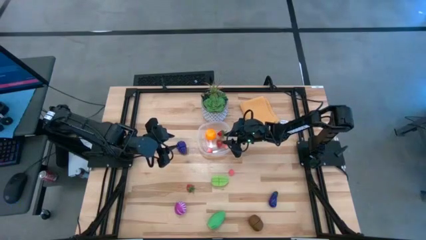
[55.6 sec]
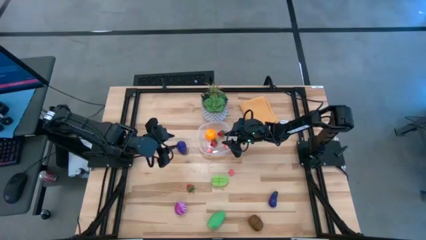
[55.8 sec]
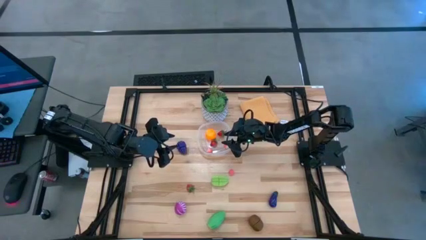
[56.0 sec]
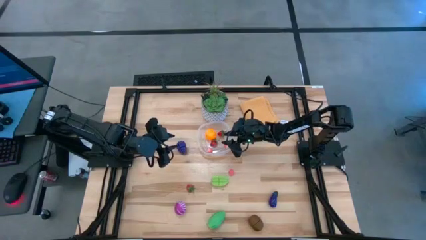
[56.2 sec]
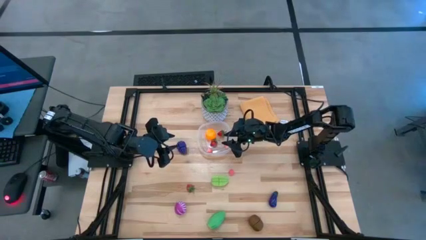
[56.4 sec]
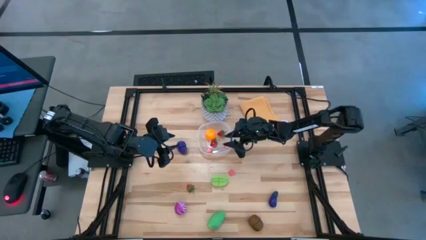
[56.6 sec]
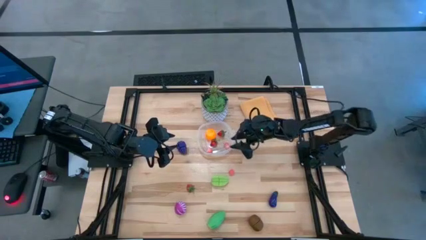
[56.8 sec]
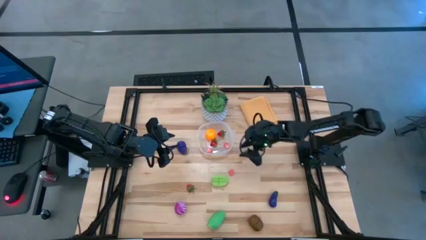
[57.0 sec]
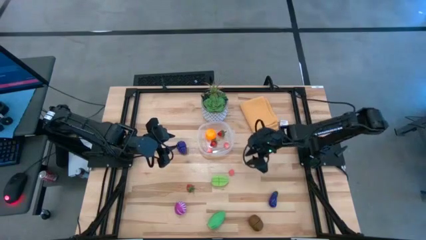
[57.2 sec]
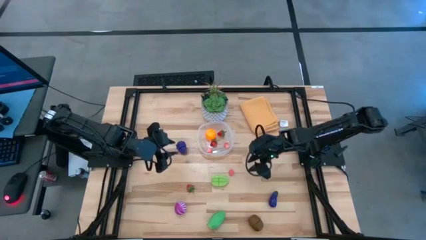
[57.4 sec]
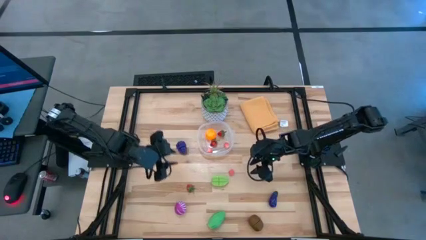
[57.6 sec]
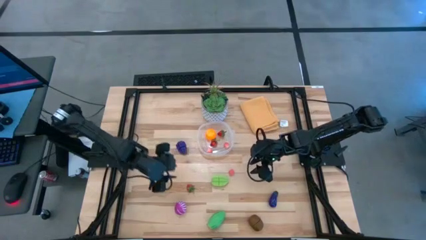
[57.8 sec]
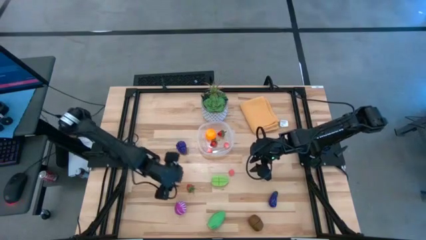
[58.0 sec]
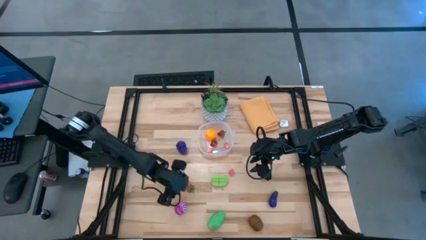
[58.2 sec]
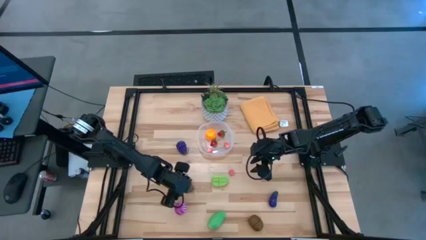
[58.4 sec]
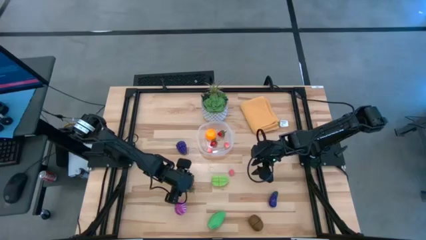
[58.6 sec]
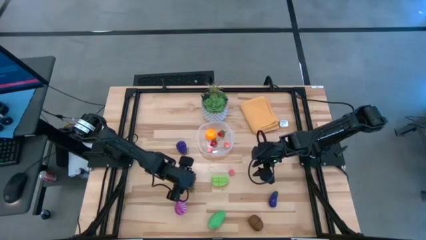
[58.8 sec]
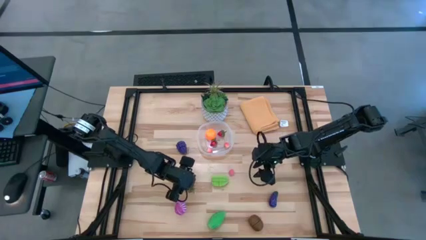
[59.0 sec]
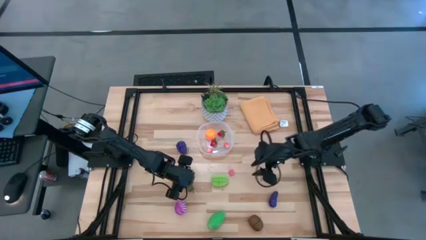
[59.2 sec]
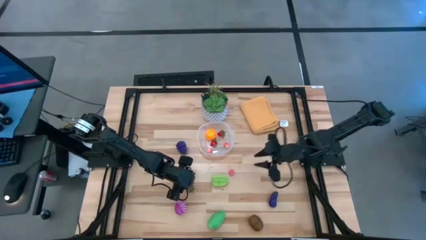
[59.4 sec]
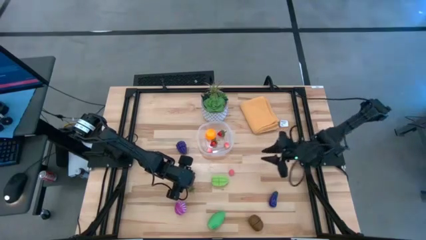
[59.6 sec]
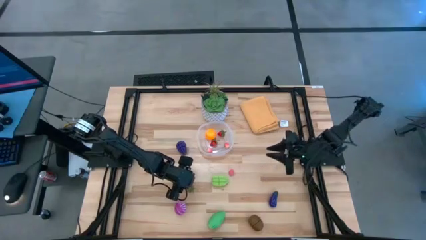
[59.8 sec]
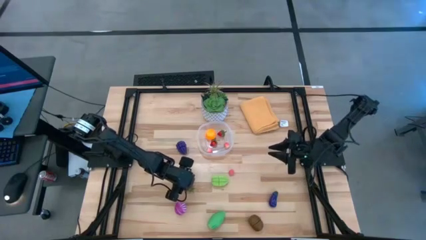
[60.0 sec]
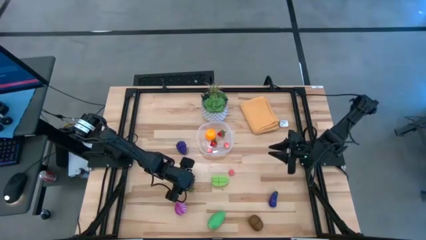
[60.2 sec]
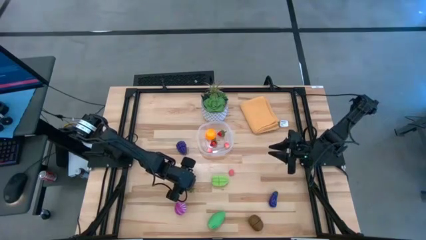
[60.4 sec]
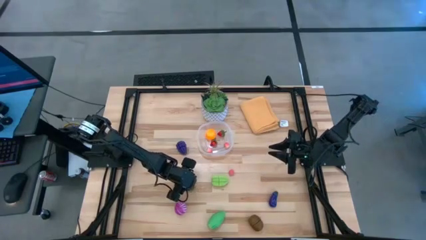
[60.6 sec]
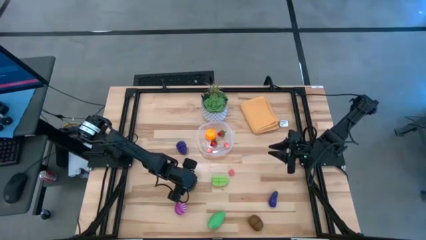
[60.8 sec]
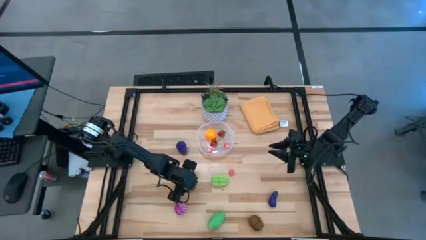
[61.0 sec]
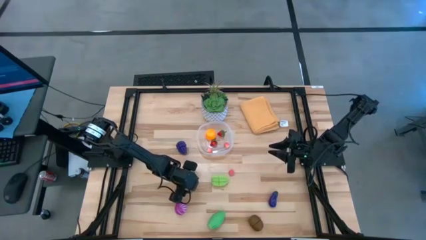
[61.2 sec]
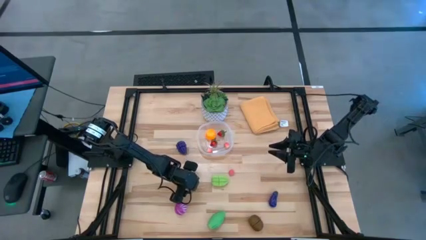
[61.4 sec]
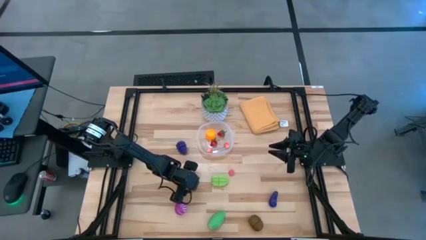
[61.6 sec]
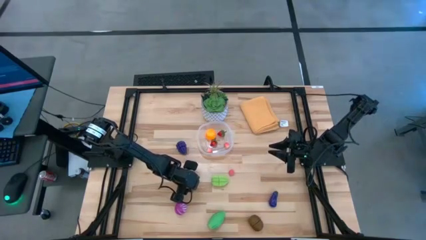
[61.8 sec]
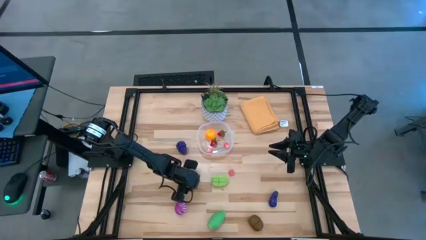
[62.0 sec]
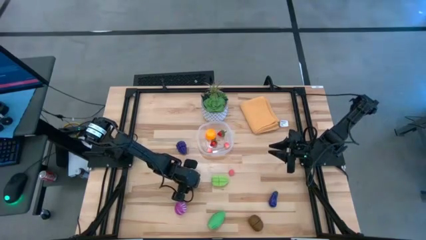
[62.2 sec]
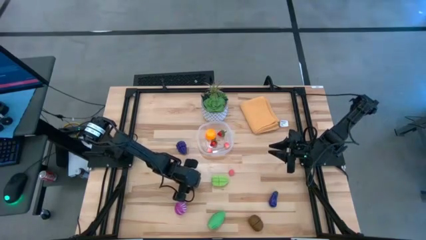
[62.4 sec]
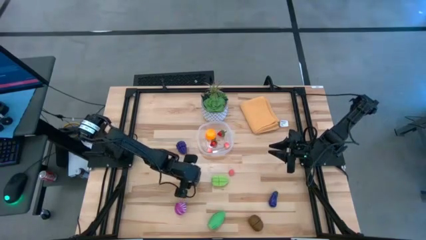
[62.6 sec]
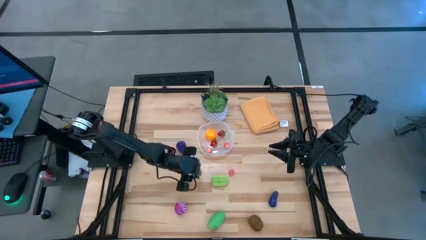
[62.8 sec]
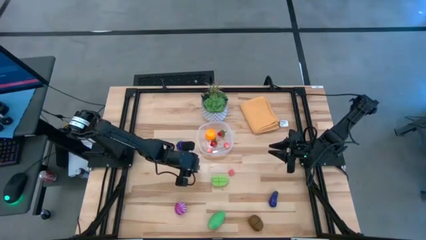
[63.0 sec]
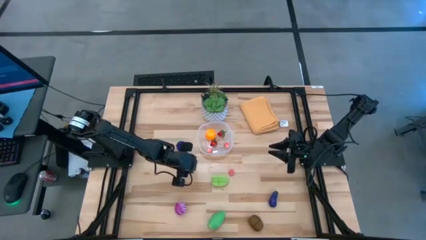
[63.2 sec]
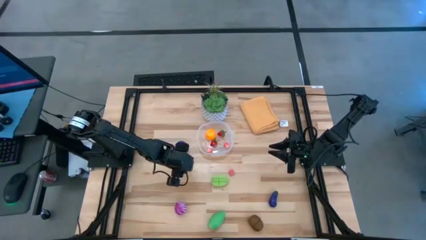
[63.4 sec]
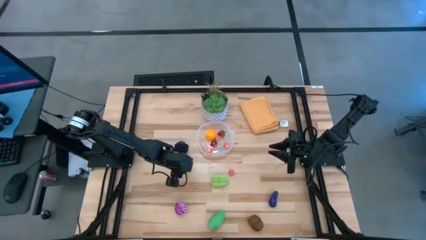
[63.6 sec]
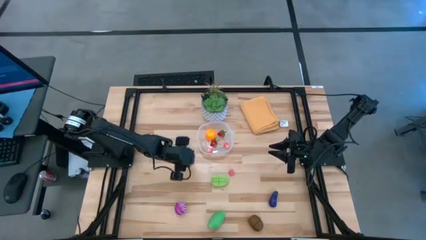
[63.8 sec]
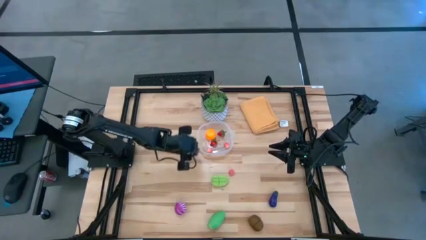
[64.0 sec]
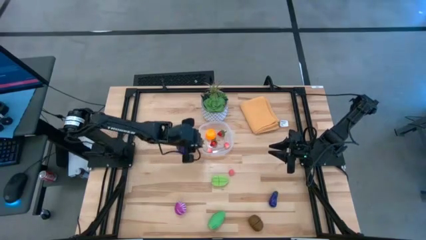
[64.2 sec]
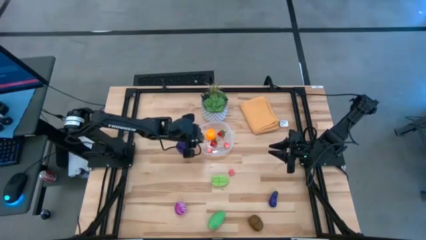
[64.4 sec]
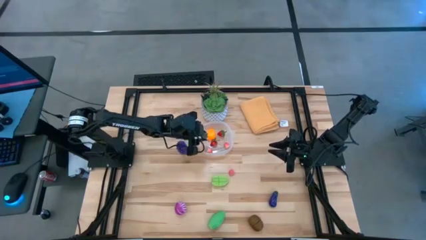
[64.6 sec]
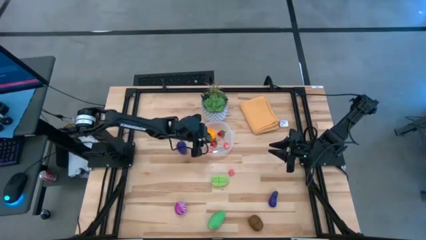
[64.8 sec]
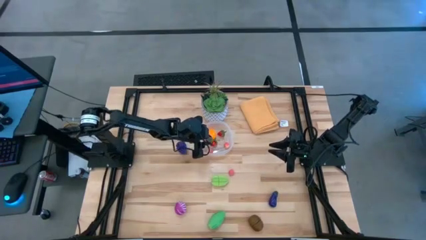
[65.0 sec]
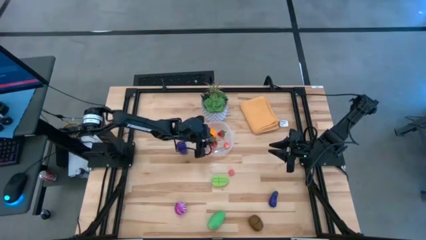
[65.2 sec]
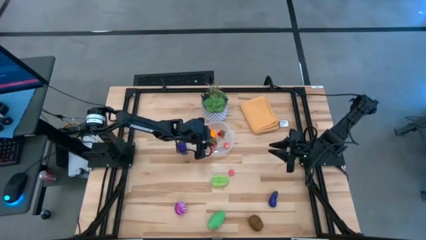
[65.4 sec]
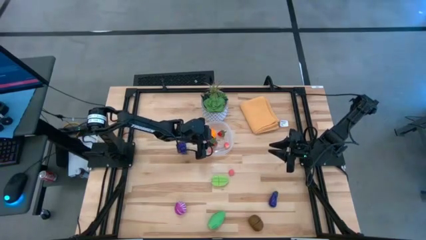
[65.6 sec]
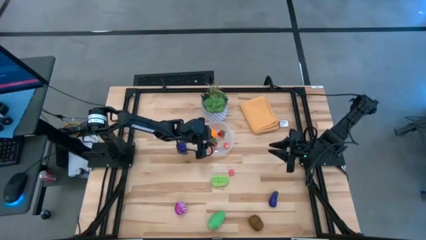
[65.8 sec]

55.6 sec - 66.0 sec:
Task: Pick and placing Produce into tupperware
Put the red strawberry into the transparent bin

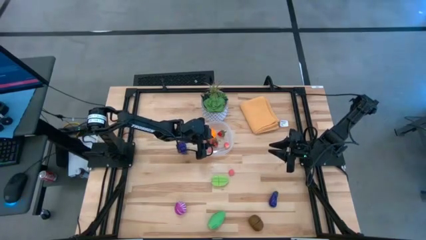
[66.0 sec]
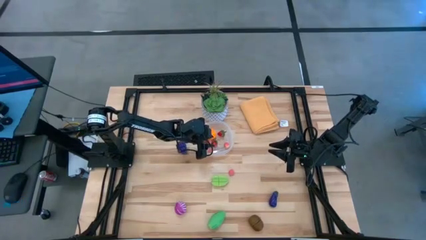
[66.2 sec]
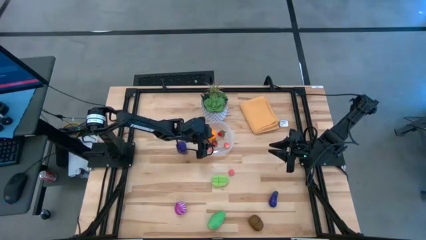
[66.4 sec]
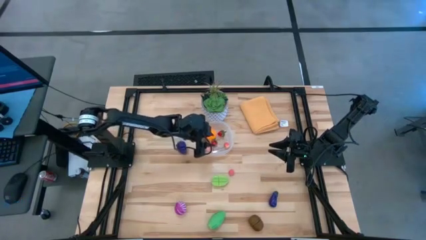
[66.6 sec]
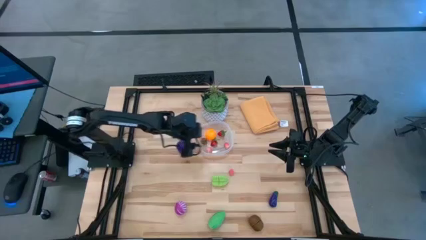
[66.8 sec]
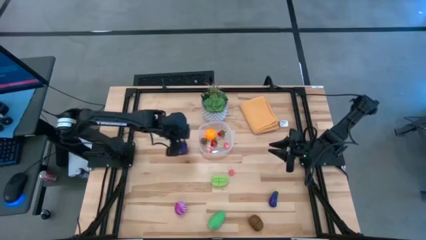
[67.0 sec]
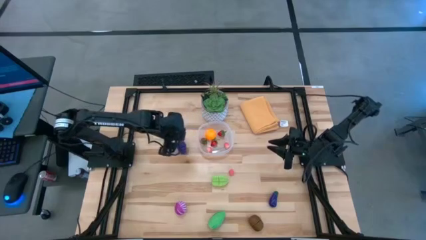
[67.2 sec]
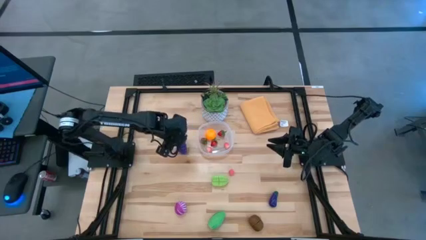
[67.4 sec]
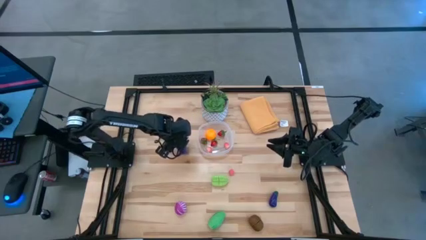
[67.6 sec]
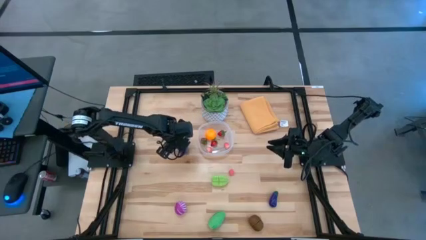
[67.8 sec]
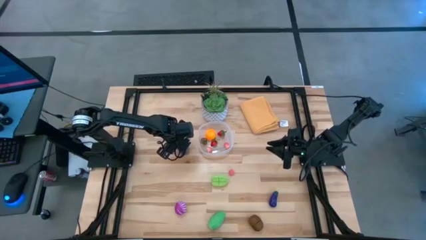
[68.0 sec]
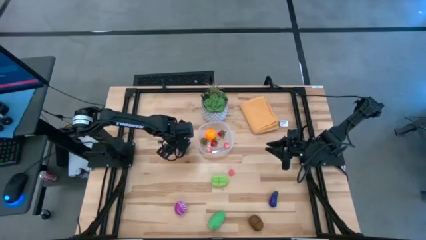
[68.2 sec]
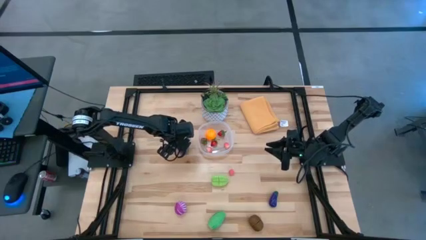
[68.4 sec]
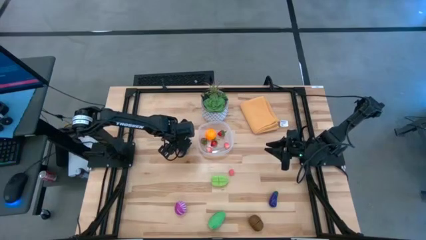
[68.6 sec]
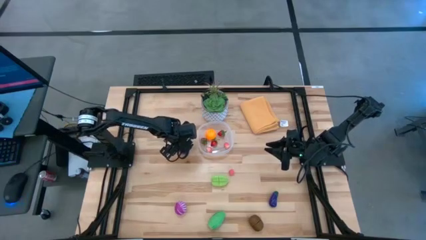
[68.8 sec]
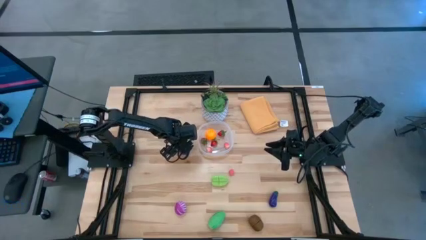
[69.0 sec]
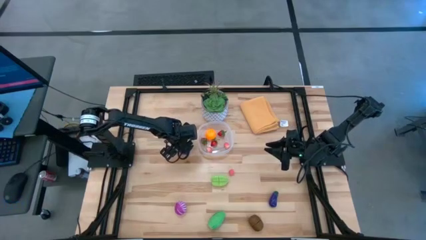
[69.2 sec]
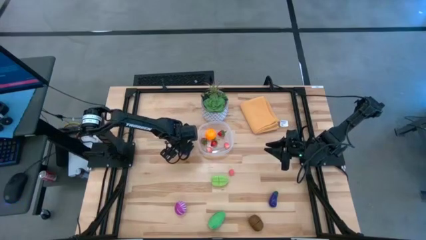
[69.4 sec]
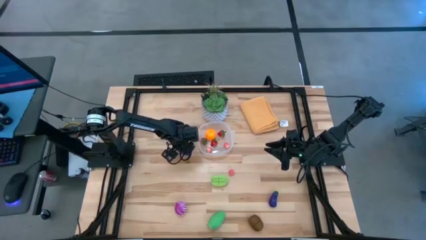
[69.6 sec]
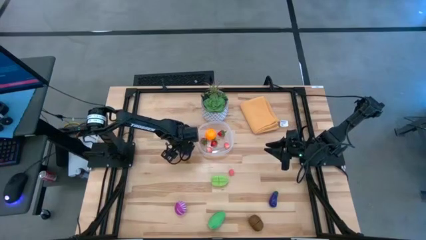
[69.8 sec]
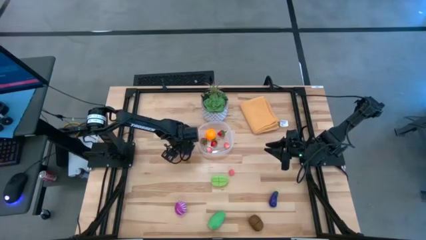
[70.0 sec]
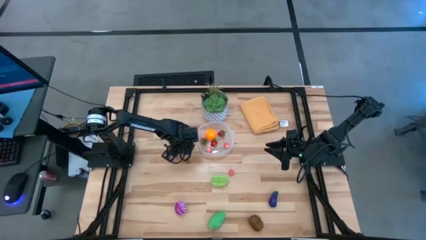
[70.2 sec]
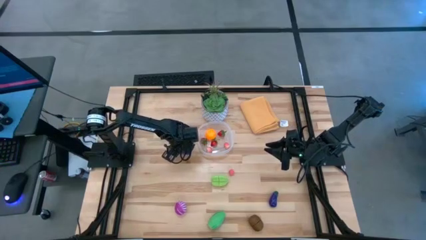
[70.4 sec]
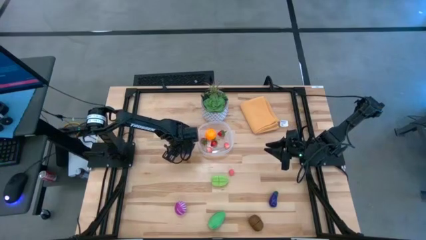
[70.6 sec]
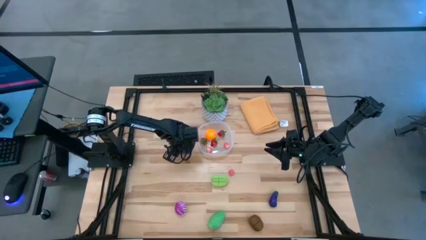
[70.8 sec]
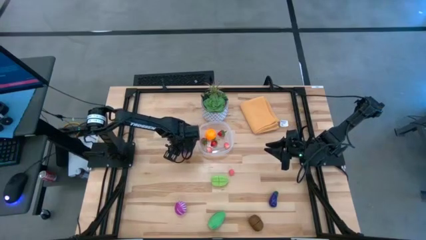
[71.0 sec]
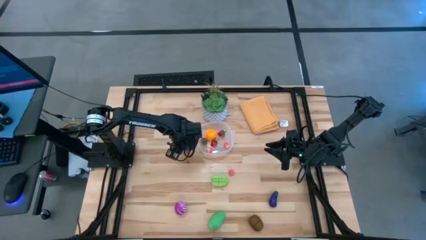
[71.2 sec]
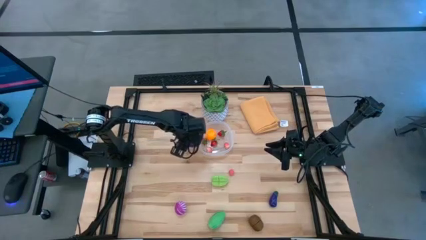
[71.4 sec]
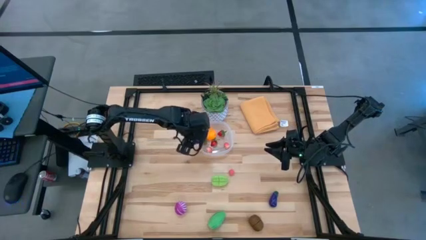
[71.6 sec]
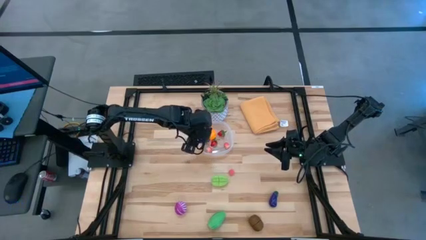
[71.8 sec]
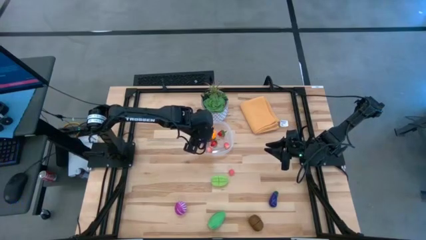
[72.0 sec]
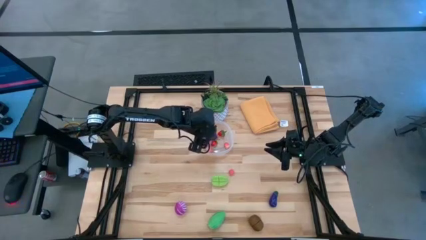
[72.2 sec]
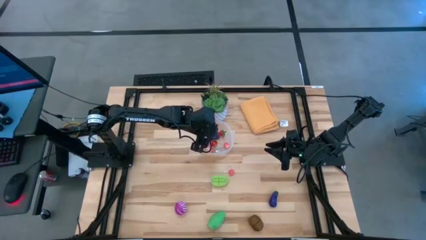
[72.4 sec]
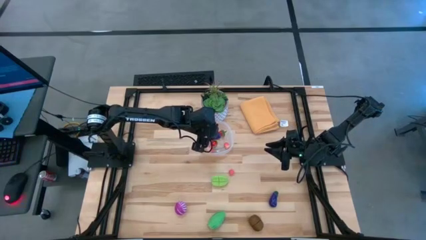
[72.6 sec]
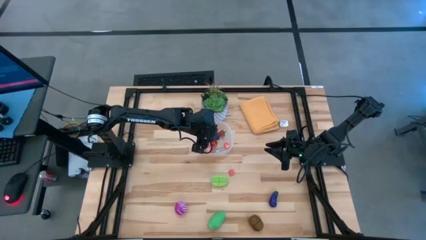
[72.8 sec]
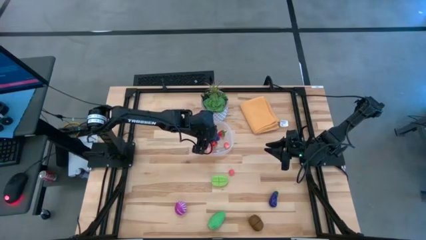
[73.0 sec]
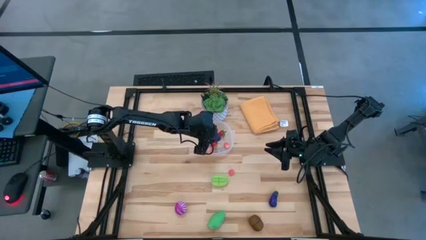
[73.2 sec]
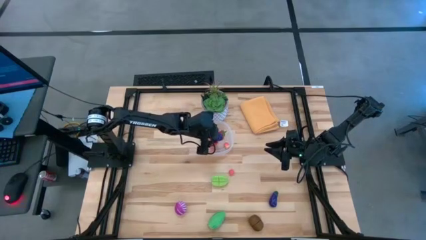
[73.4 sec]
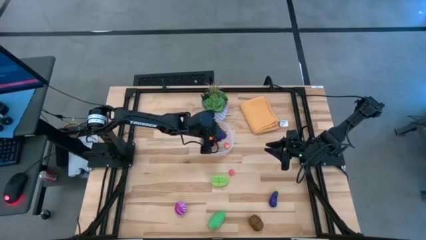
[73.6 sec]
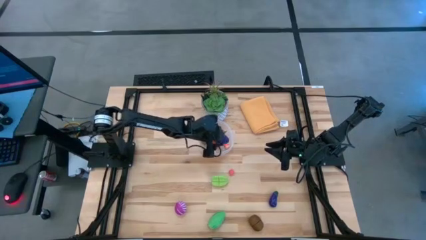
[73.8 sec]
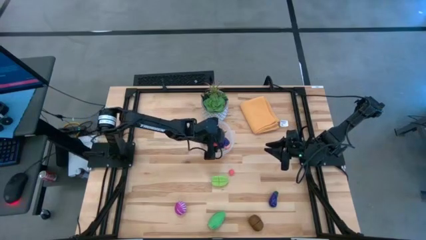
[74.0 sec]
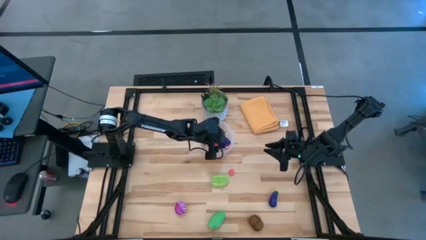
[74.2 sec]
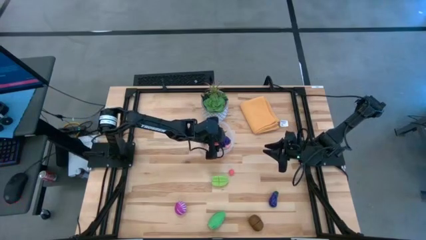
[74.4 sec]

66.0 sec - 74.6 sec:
Put the purple grapes into the transparent bin
